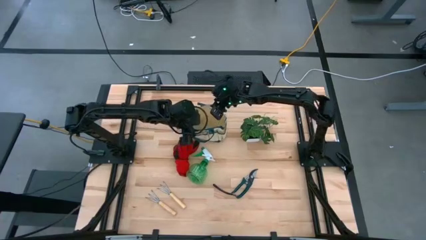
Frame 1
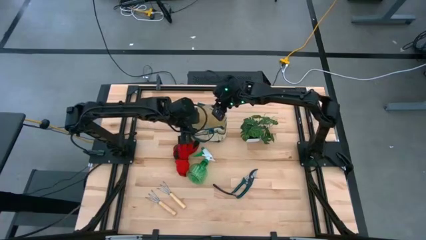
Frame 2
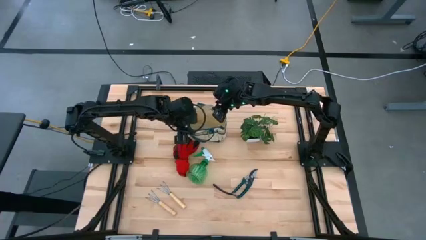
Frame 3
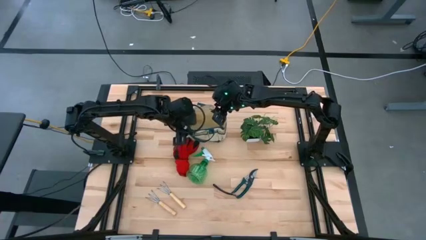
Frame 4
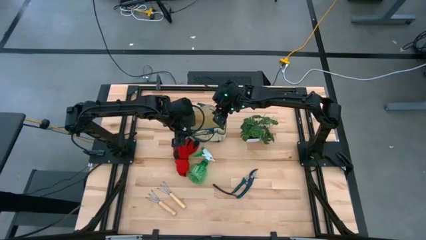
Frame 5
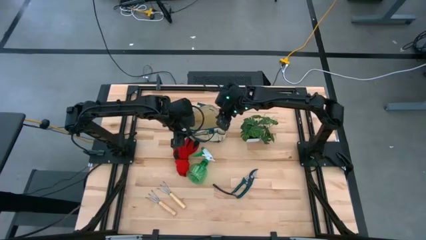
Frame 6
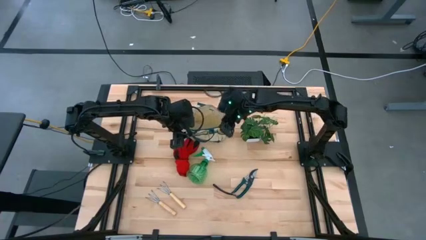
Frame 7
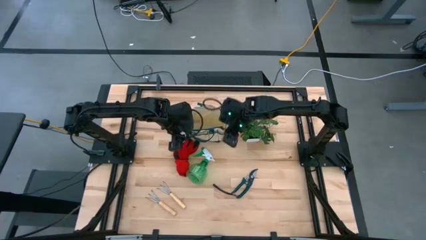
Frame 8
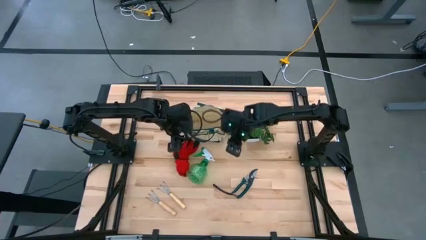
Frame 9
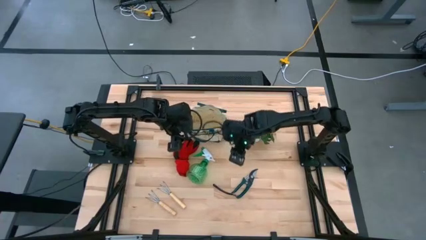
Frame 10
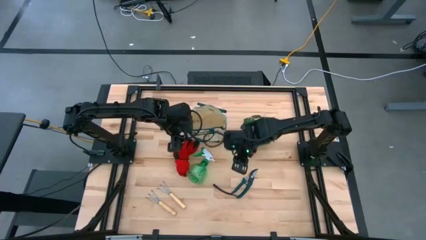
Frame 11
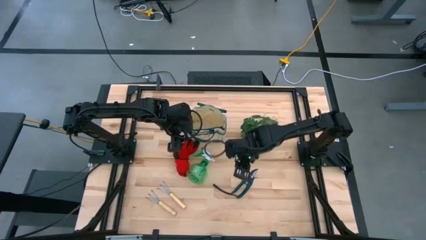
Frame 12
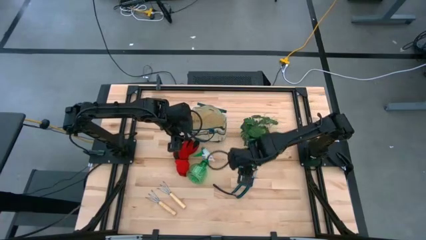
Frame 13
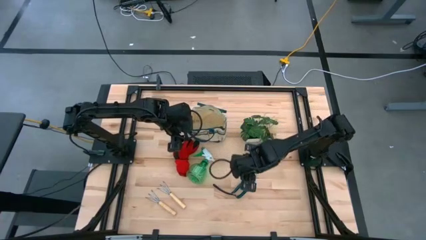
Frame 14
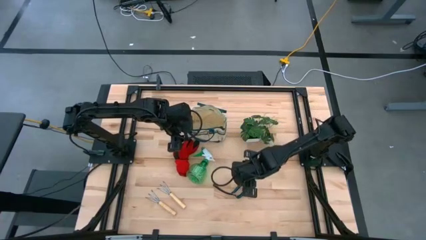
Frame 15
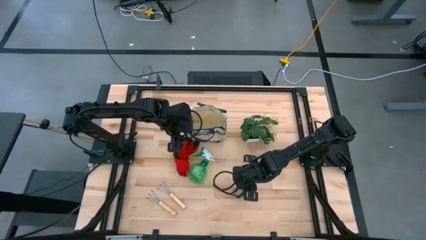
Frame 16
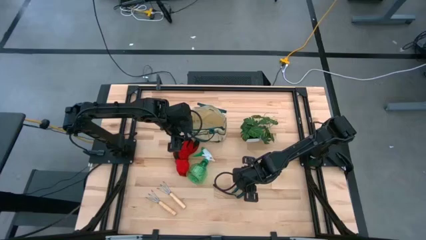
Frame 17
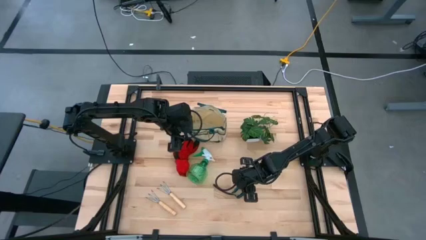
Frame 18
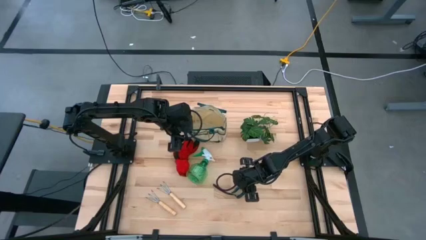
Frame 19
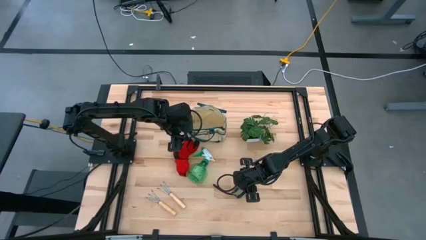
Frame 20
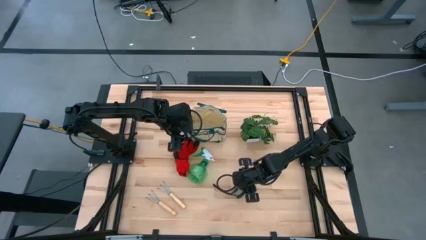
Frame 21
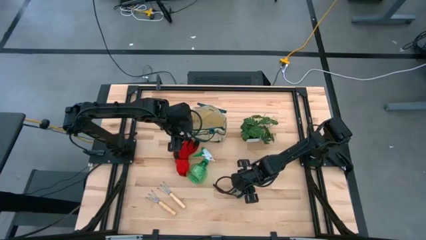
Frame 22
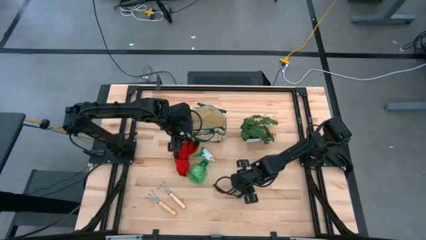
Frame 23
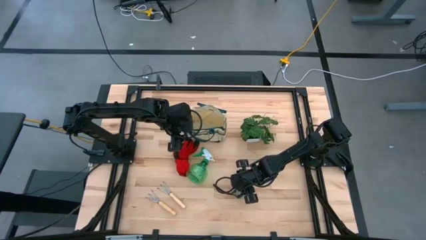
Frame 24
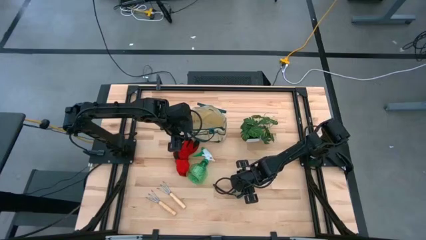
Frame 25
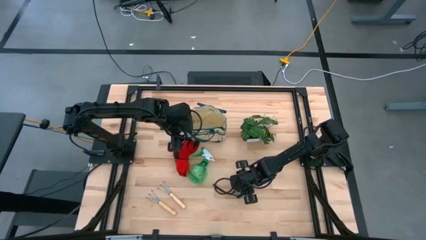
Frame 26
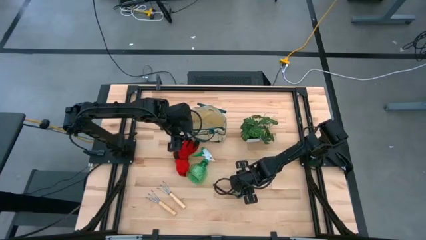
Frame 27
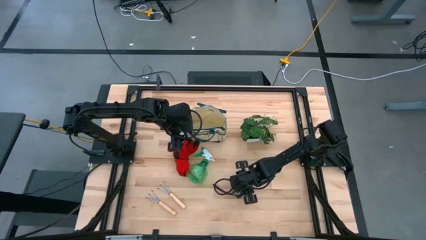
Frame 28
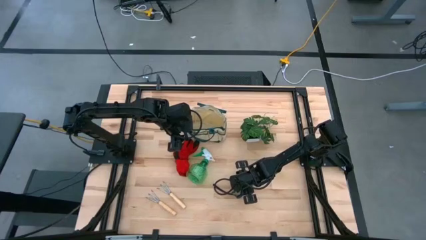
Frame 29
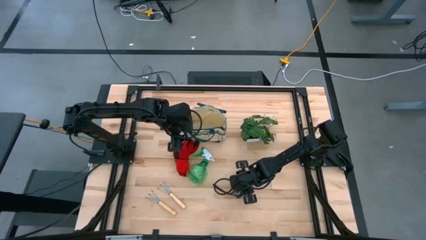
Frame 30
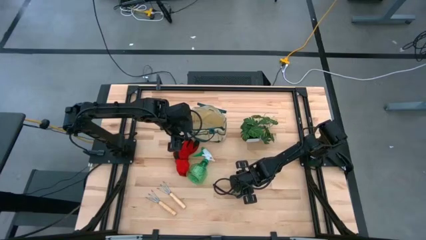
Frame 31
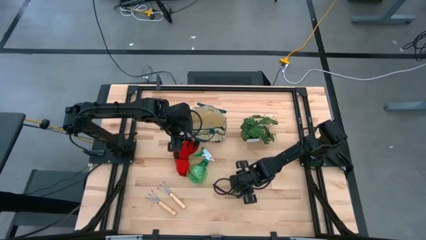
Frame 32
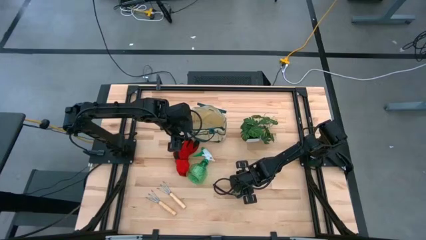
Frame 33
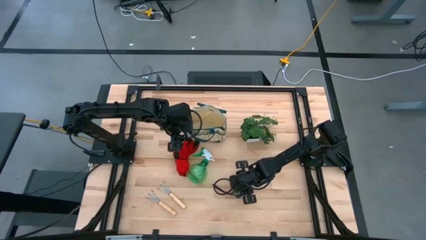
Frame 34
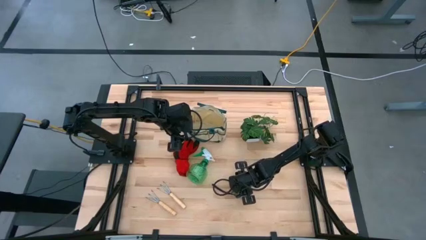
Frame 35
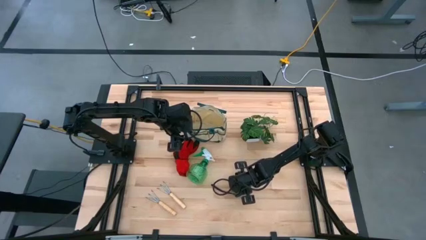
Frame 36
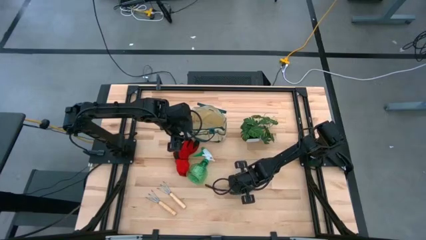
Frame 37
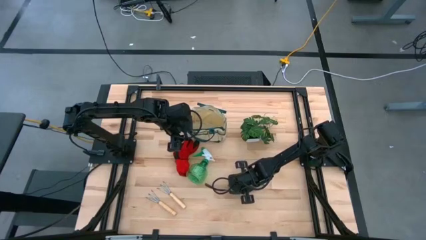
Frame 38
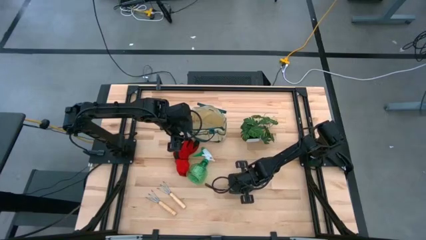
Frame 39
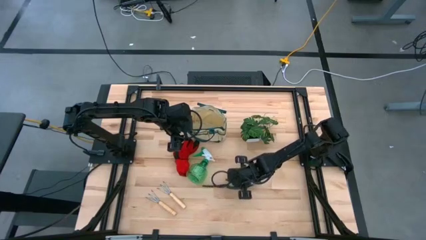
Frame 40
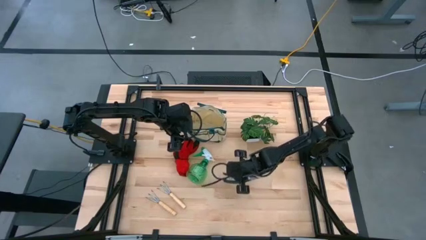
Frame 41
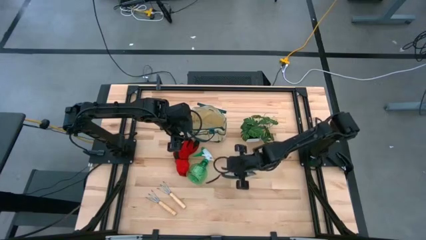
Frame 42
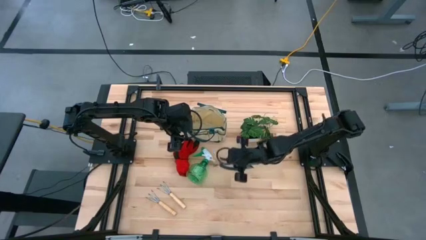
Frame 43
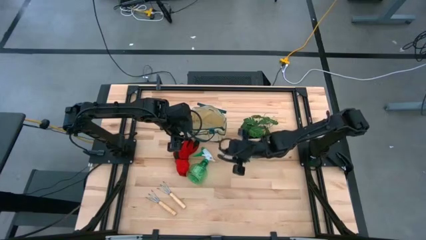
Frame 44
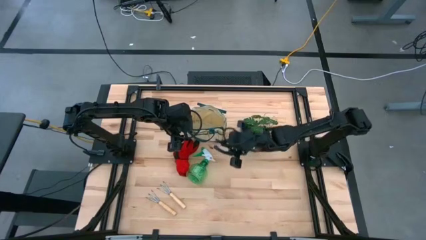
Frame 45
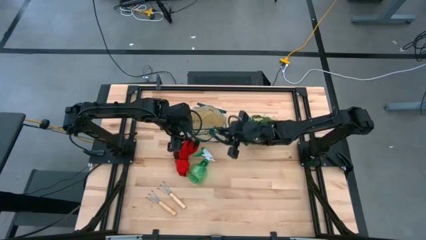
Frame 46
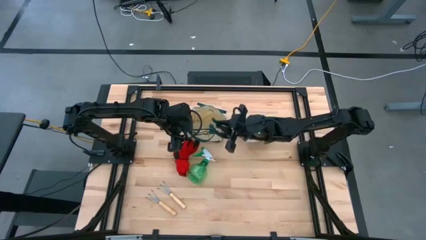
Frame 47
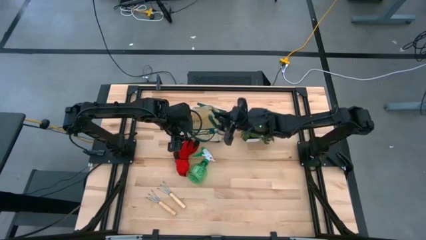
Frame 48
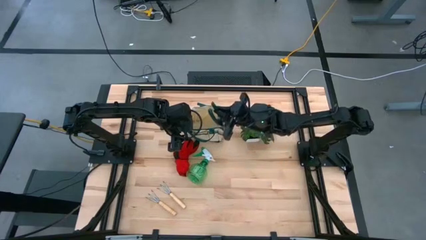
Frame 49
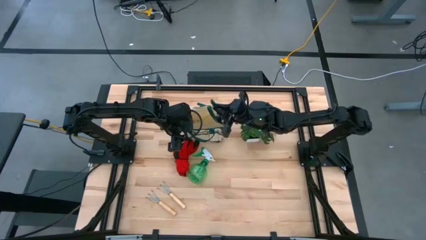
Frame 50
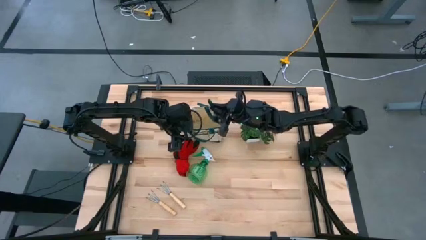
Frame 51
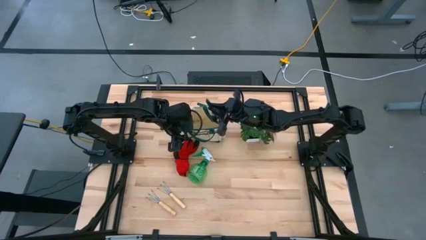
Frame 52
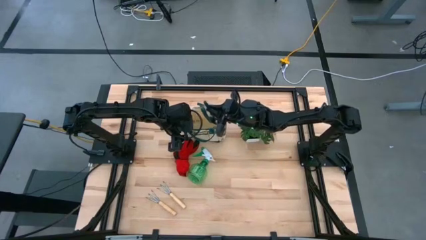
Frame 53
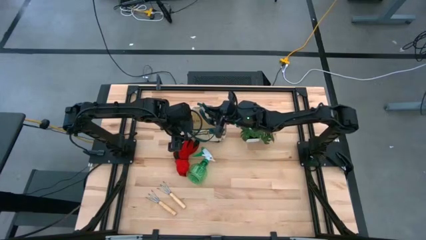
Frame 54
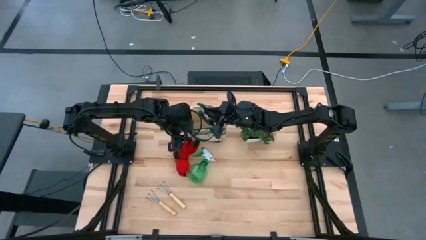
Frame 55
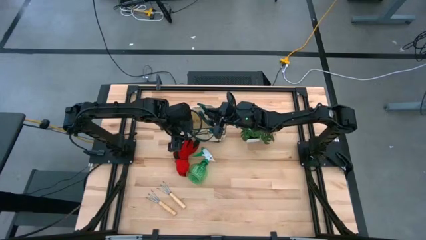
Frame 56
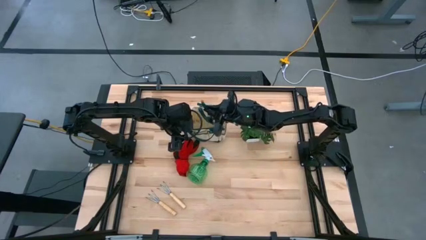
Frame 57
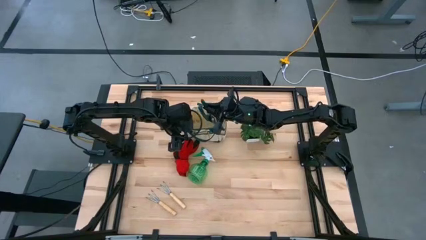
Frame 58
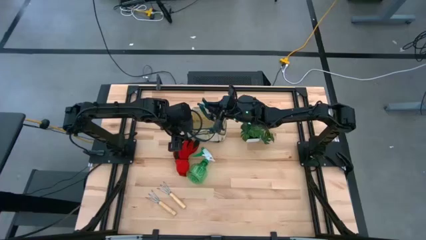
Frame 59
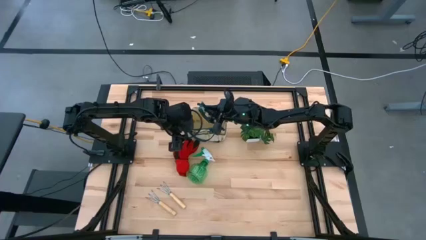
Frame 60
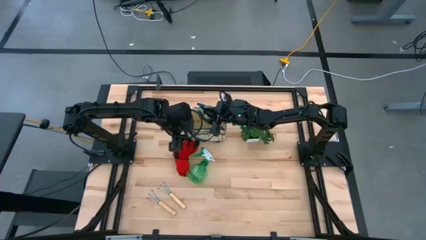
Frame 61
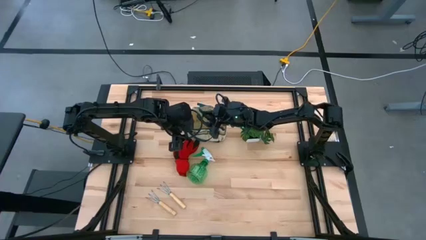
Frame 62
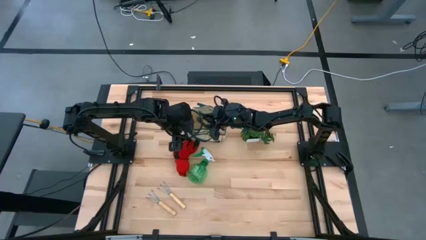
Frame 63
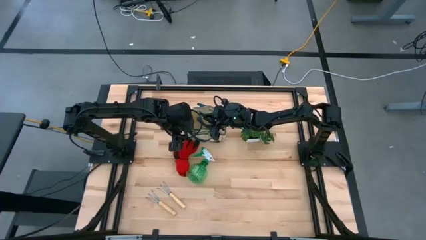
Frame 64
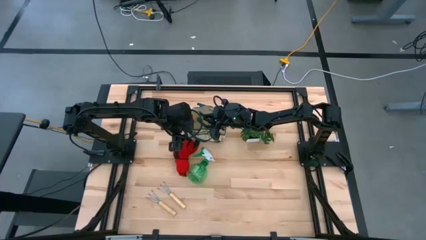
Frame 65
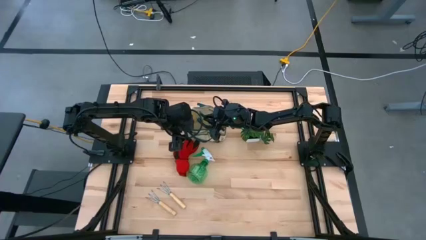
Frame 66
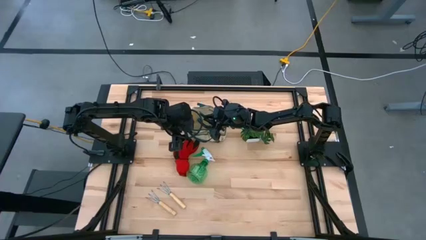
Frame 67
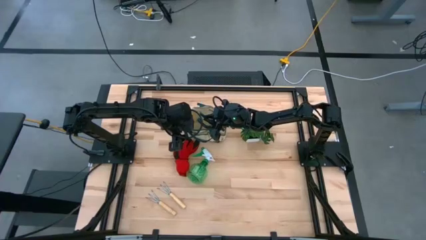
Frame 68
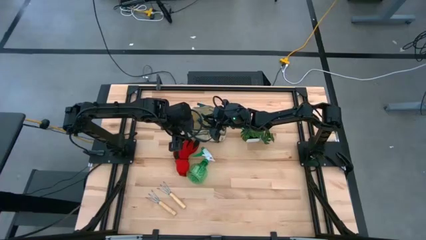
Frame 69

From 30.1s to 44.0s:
Task: Pick & Place Garden tools in Gardening bag
Put the dark green shears into the green gardening bag
